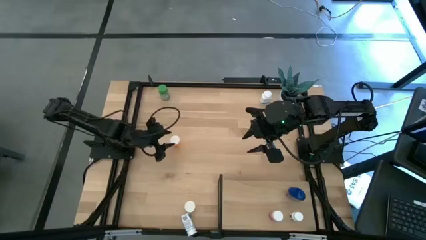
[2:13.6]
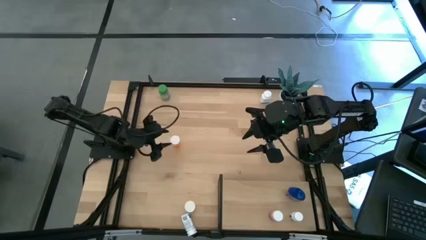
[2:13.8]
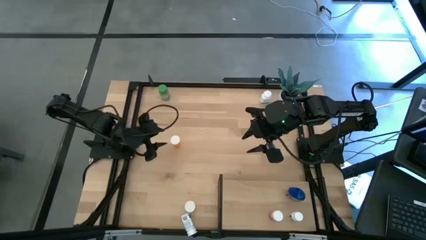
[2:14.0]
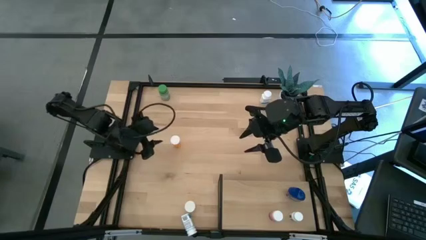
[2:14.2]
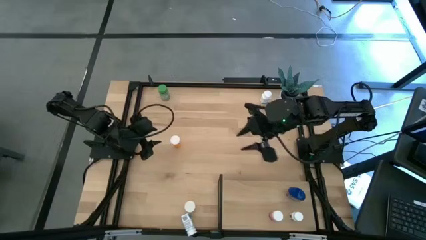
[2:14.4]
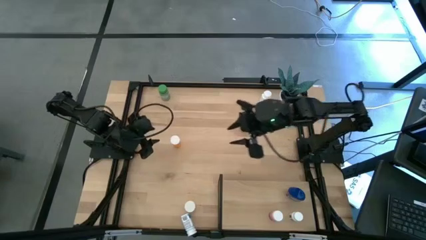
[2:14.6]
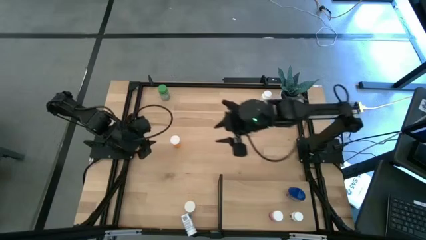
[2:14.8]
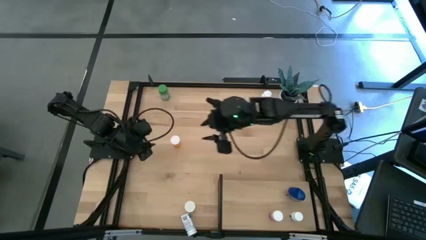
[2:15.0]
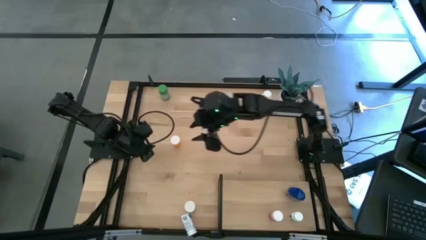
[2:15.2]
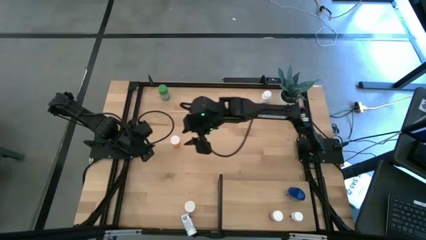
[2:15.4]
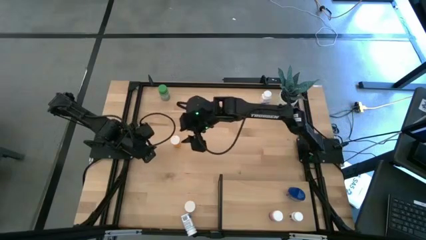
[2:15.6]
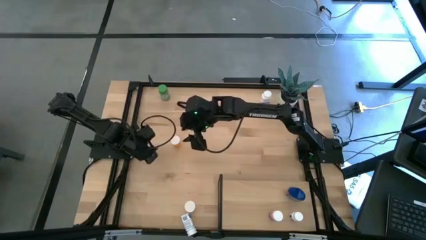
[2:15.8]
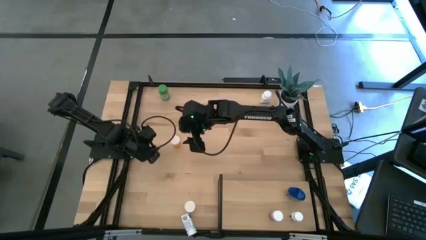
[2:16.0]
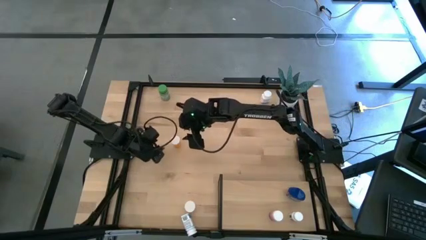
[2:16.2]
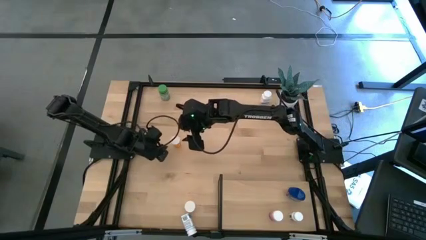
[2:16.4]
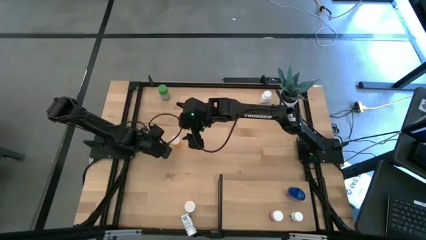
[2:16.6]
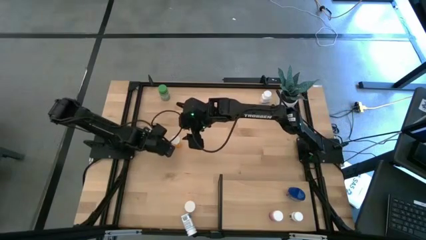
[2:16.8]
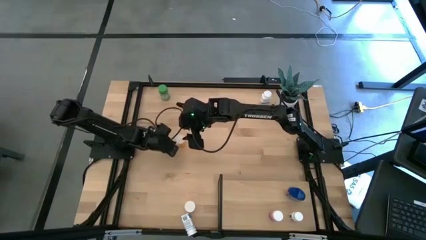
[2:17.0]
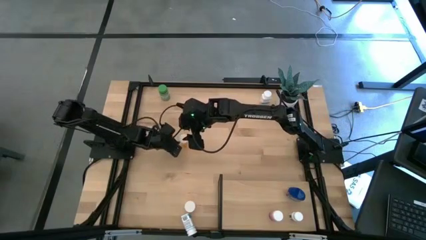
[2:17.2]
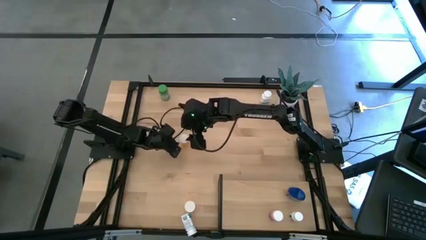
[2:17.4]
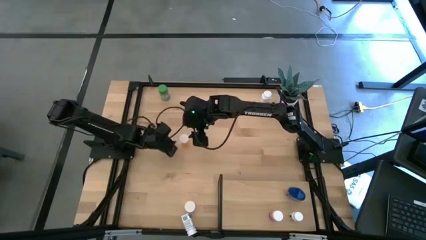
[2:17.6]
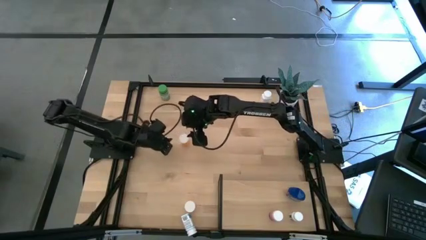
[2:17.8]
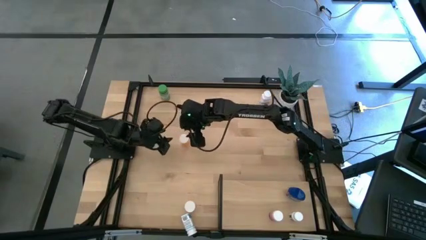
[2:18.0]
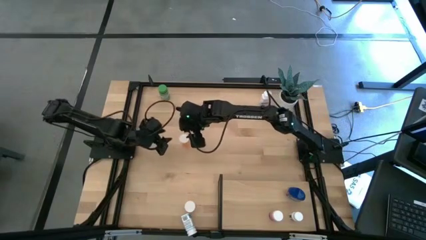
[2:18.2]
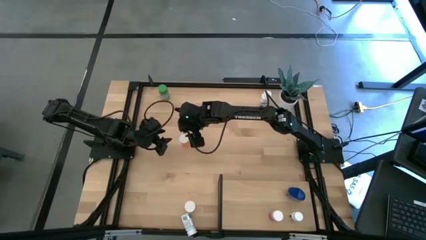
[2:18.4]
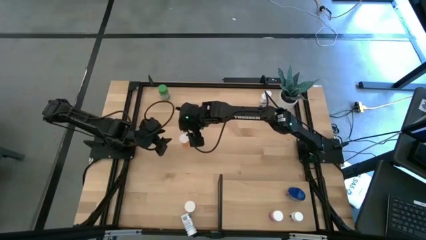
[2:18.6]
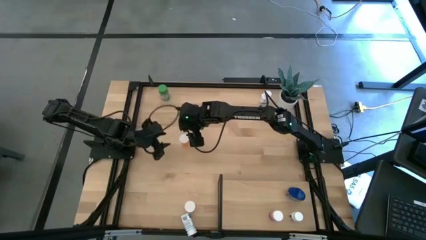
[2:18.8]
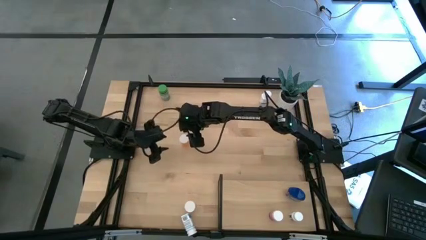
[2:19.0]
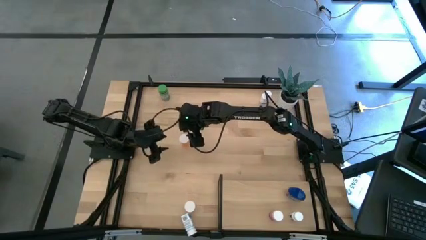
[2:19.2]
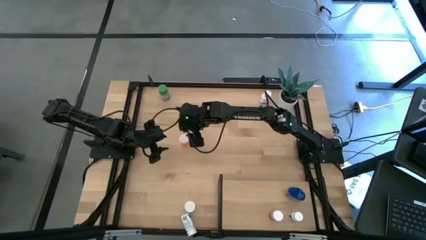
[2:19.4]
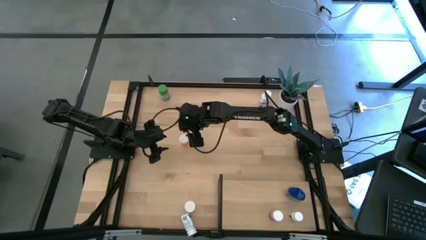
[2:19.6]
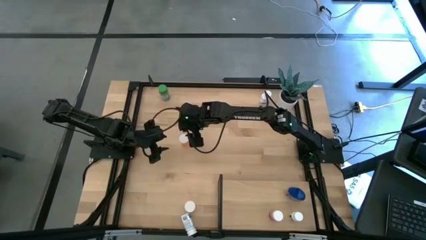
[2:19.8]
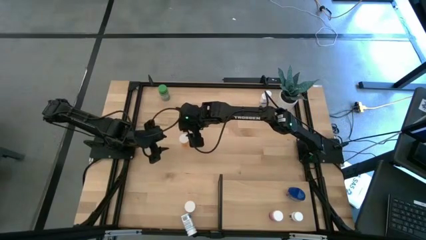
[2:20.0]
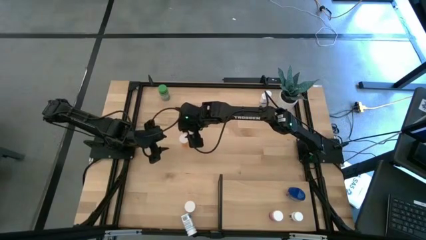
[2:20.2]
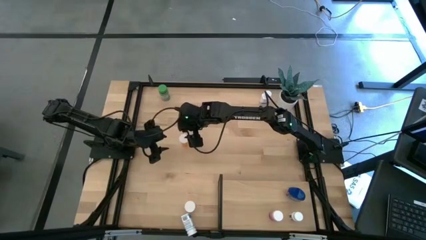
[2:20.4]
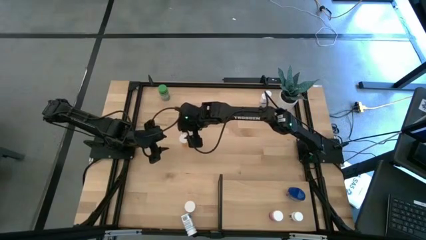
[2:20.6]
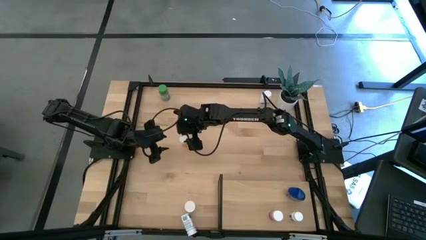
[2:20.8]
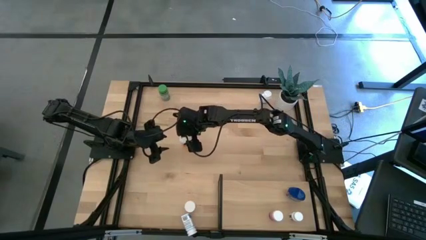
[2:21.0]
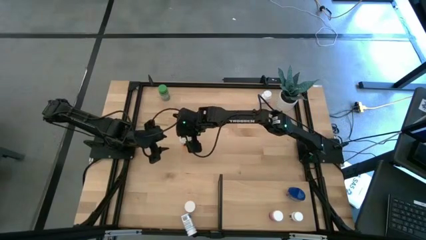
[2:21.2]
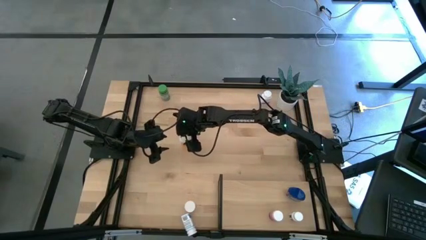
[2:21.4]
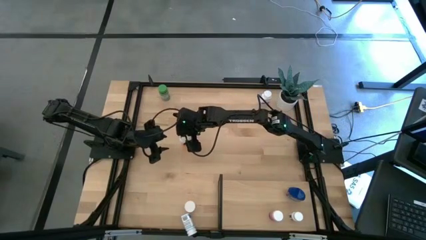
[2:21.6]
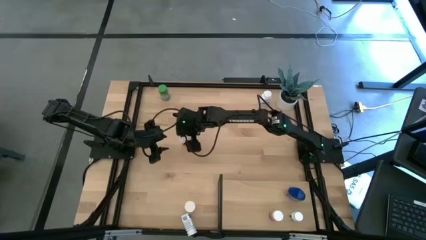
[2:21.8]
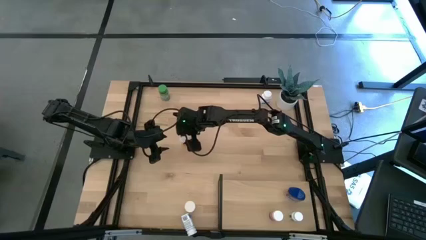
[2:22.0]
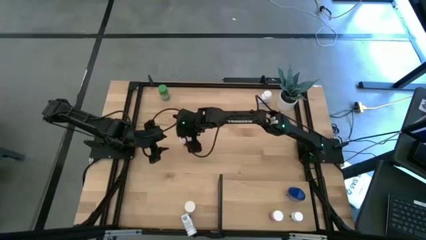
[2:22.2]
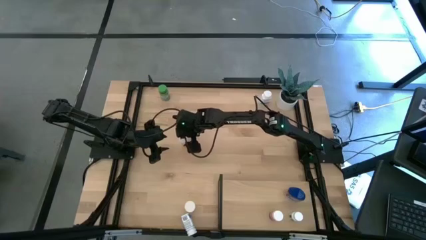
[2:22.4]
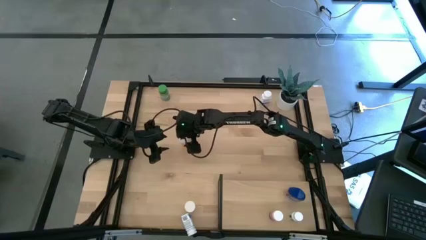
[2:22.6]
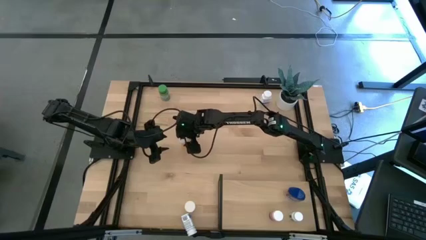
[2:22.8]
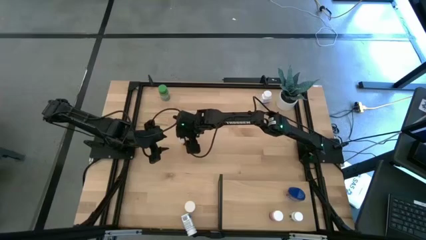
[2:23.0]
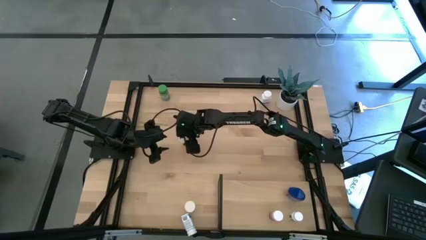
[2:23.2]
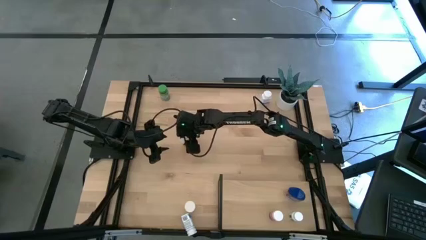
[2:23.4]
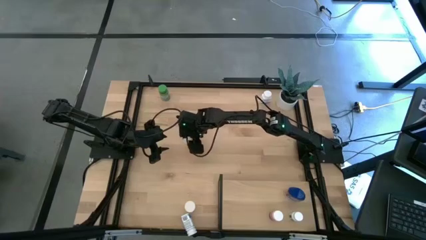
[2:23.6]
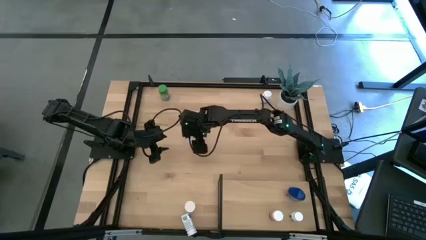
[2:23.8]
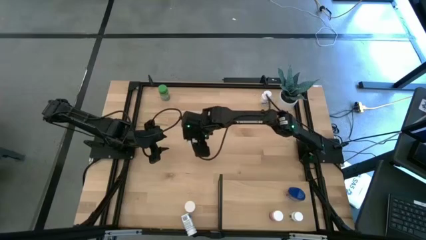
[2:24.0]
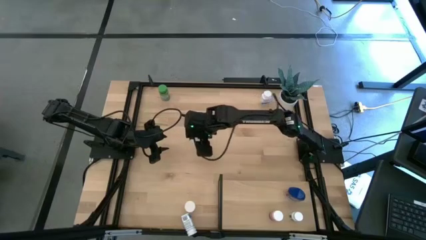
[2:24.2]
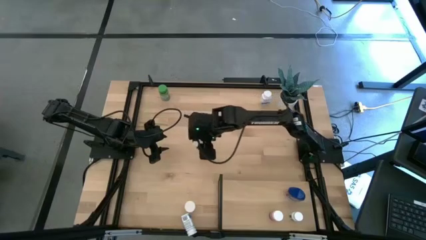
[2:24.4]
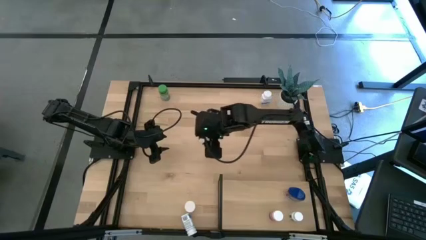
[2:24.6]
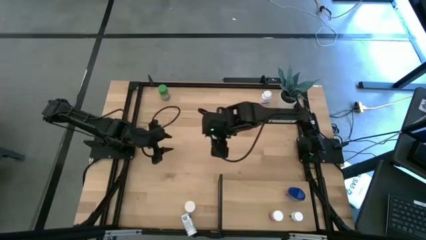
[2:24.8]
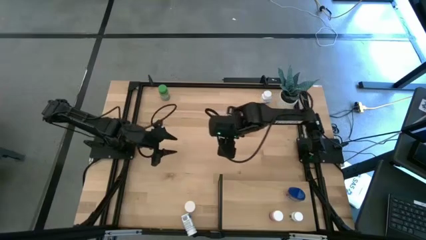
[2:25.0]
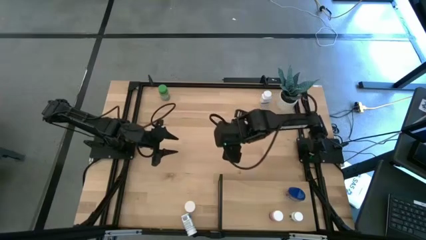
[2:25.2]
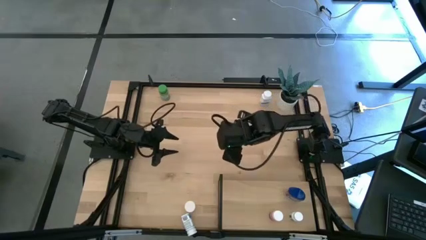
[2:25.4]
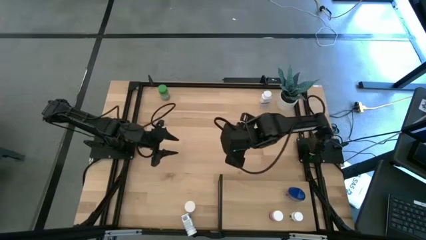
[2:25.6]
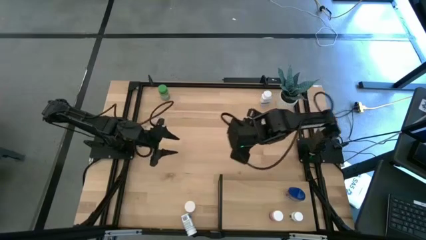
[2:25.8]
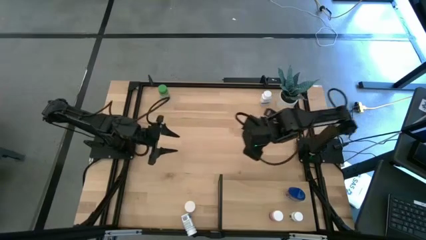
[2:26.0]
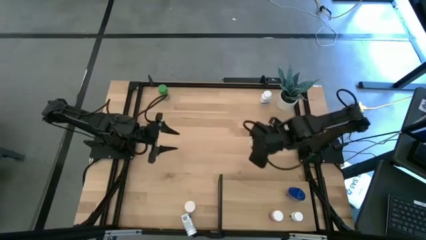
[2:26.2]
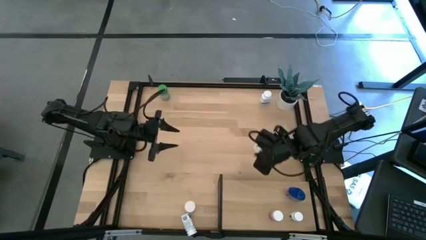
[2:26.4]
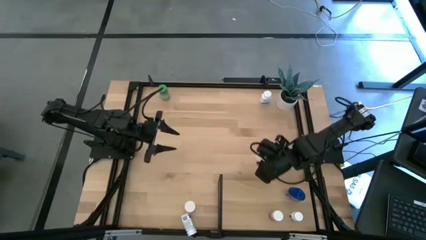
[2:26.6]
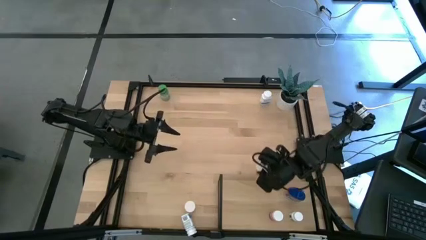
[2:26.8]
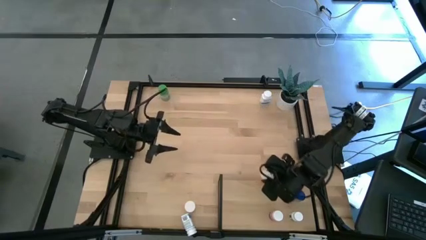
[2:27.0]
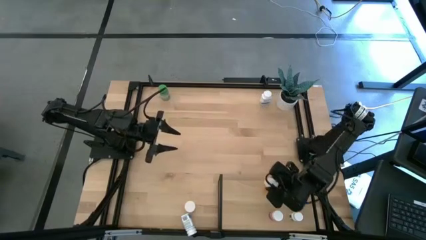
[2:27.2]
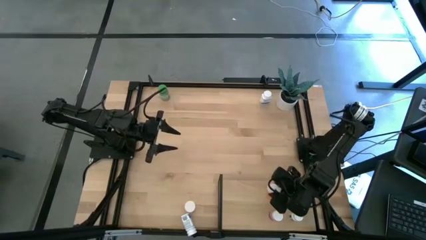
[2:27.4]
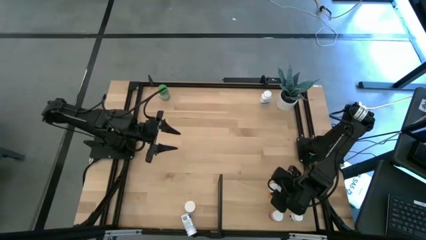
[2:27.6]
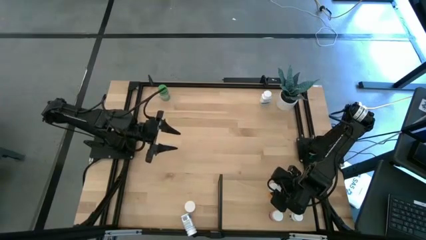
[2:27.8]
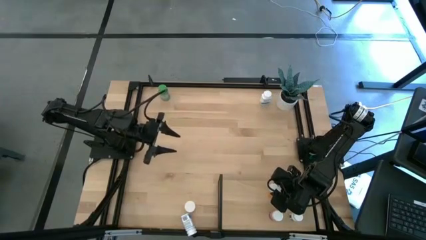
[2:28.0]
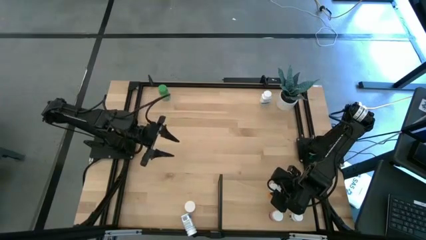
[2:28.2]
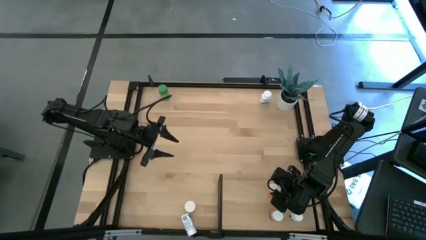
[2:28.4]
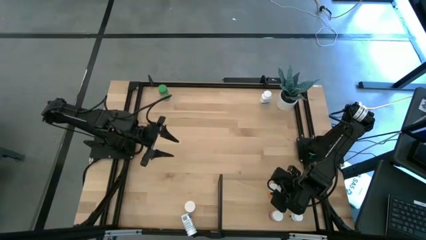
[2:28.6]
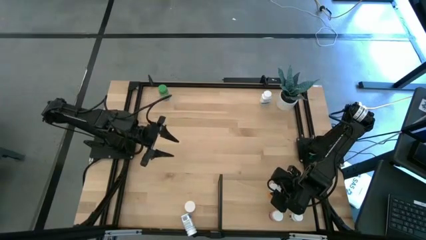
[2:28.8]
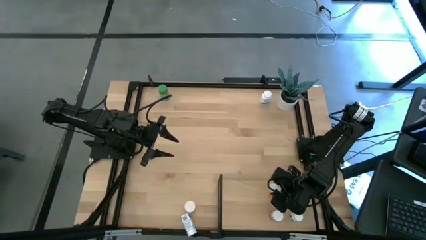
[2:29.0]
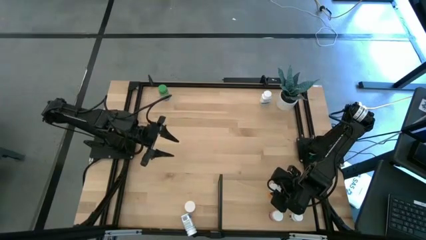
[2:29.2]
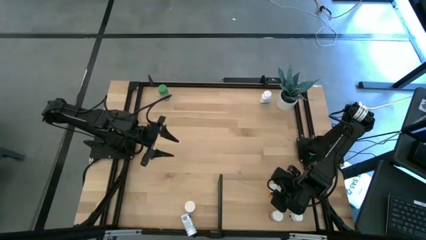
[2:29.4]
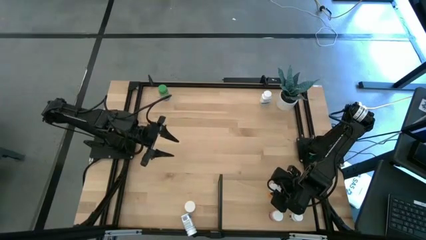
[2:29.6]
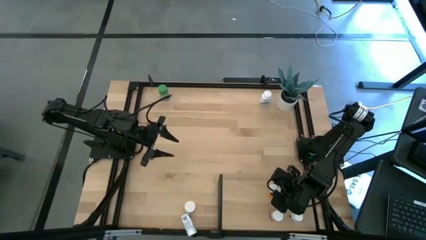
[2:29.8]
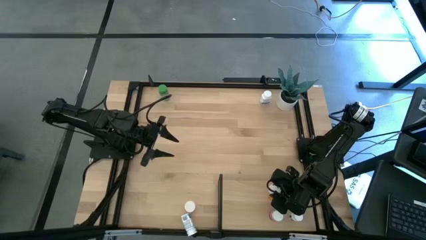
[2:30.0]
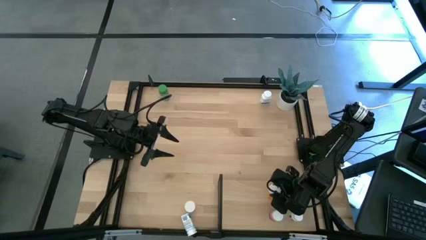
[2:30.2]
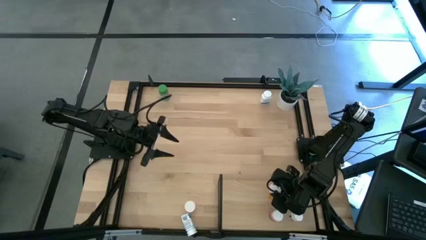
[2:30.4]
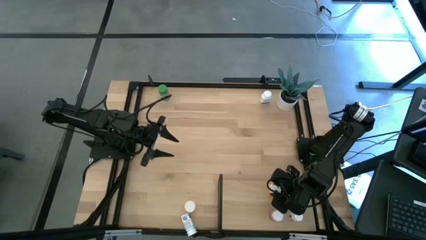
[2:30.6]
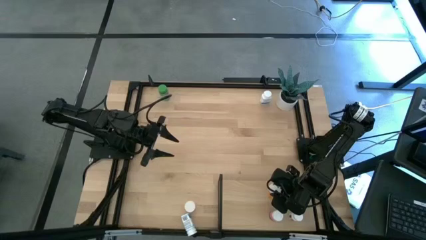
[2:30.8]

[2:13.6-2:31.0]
Task: Pick and place medicine bottles onto shelf by color
Put the middle orange pill bottle onto the shelf
